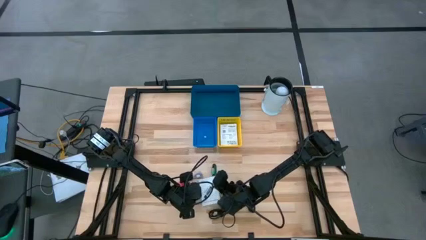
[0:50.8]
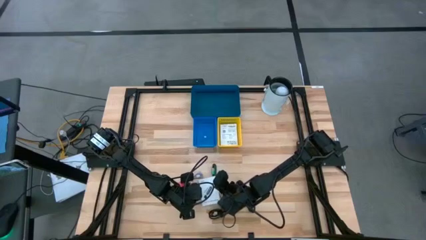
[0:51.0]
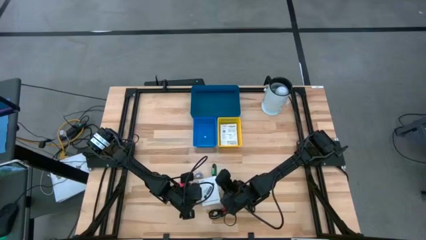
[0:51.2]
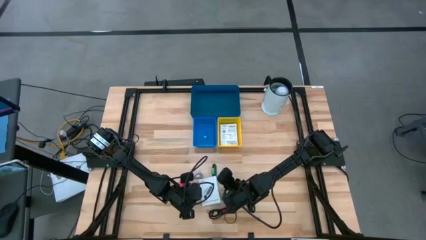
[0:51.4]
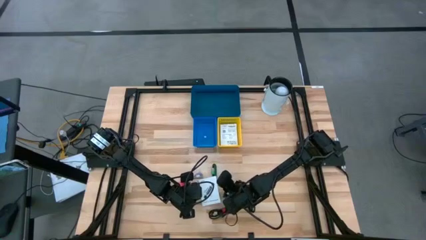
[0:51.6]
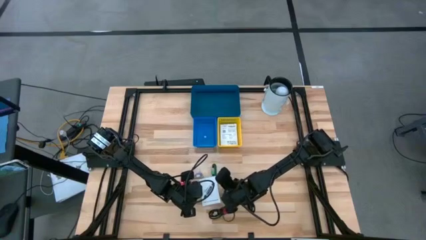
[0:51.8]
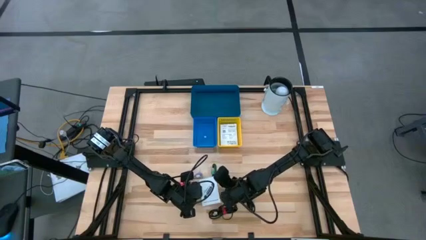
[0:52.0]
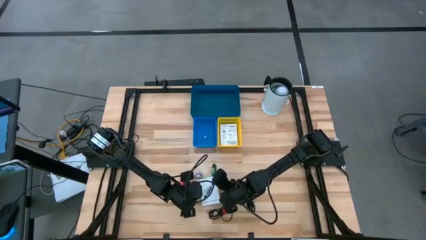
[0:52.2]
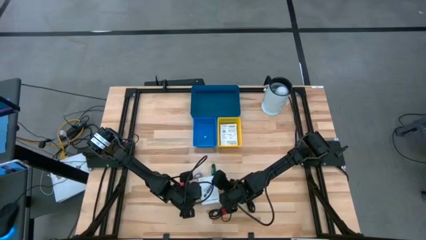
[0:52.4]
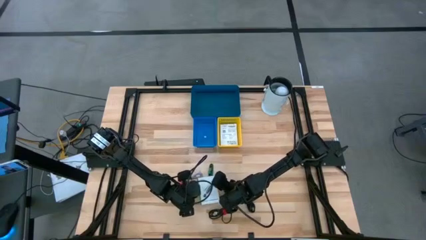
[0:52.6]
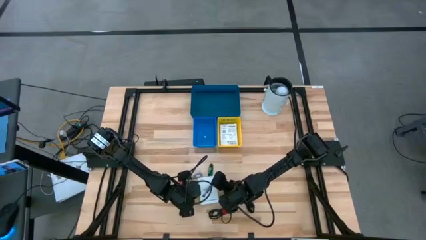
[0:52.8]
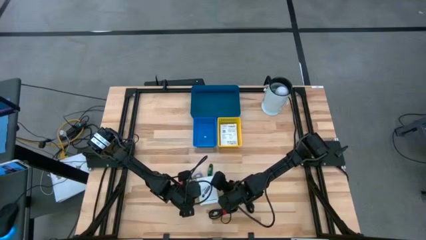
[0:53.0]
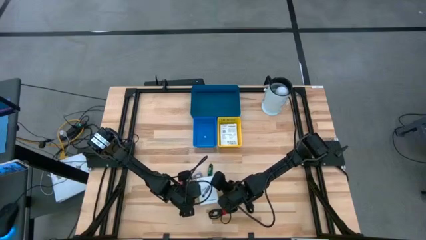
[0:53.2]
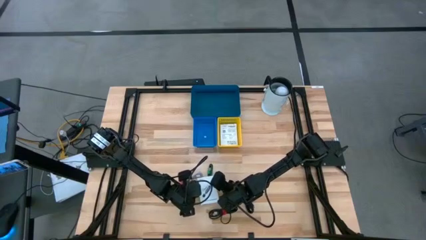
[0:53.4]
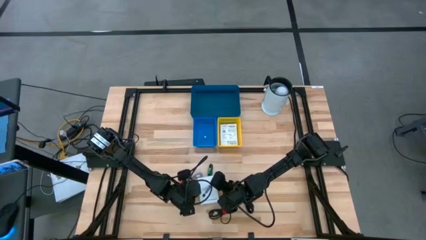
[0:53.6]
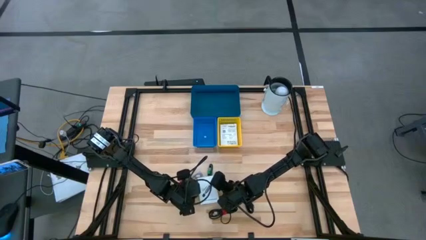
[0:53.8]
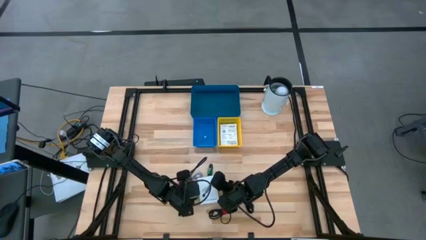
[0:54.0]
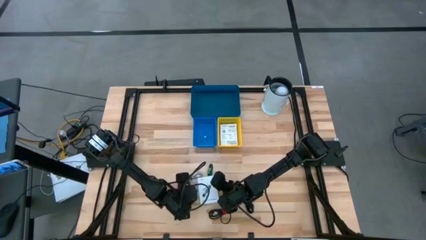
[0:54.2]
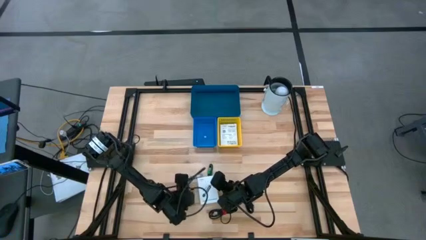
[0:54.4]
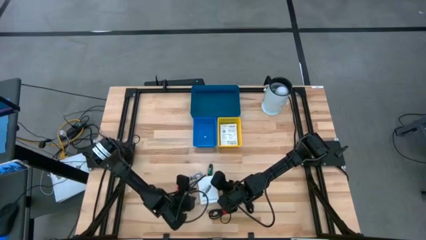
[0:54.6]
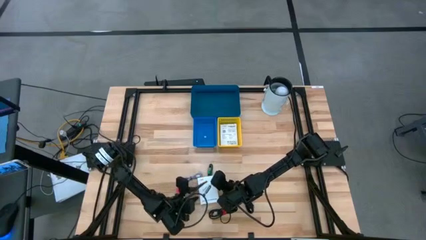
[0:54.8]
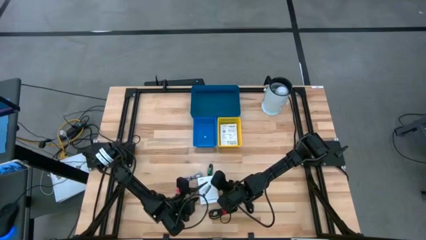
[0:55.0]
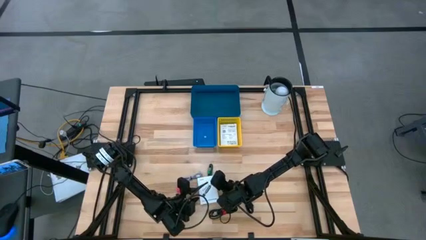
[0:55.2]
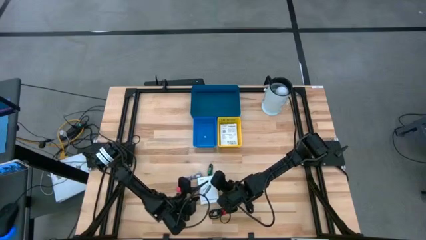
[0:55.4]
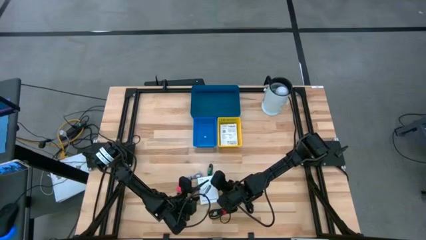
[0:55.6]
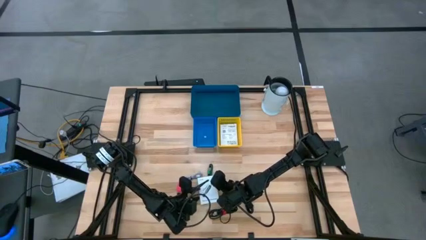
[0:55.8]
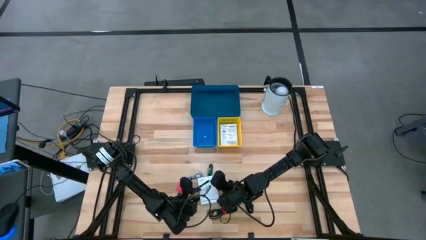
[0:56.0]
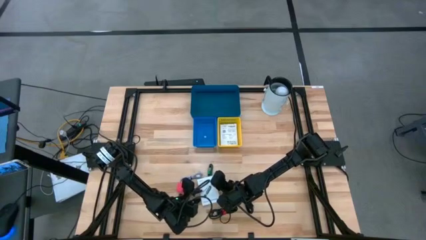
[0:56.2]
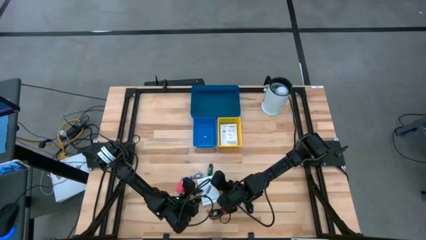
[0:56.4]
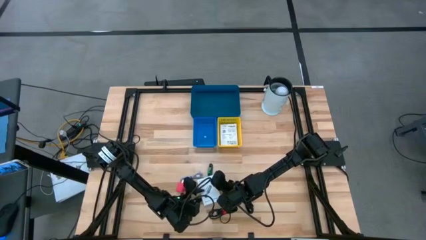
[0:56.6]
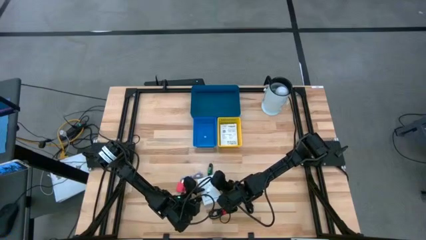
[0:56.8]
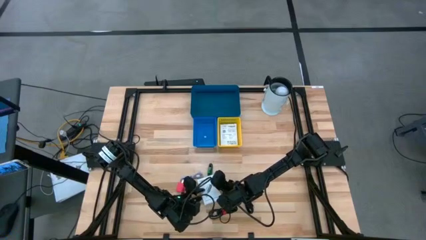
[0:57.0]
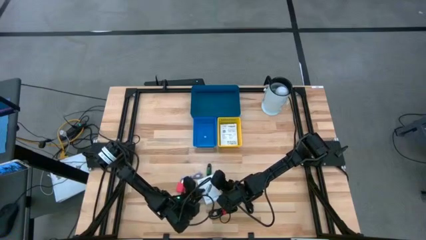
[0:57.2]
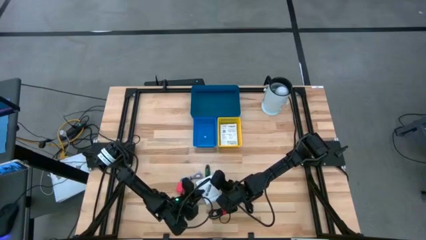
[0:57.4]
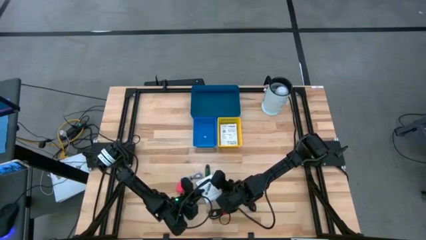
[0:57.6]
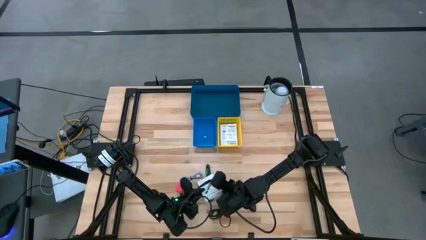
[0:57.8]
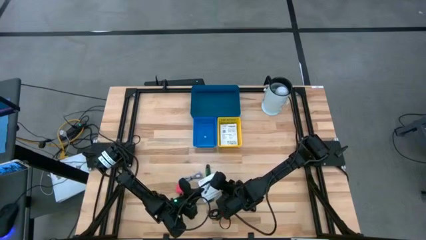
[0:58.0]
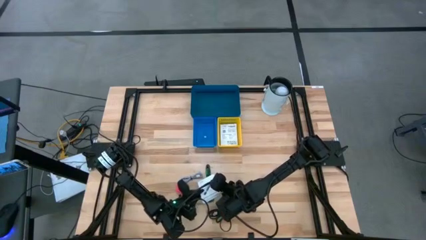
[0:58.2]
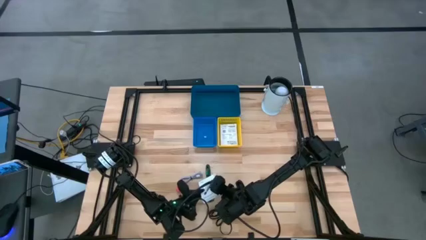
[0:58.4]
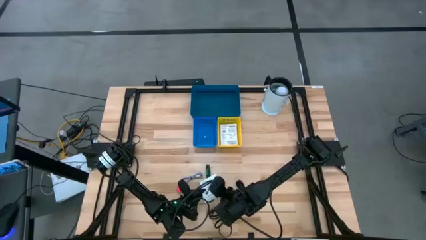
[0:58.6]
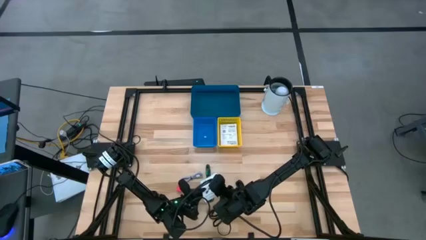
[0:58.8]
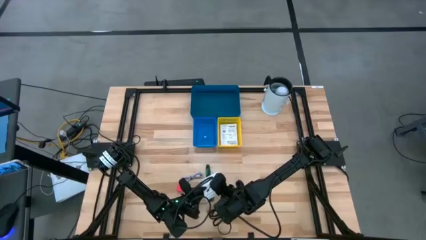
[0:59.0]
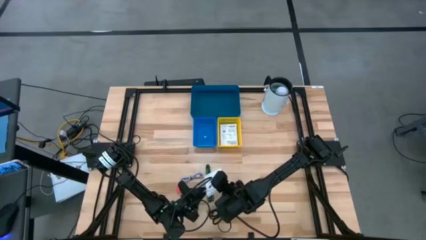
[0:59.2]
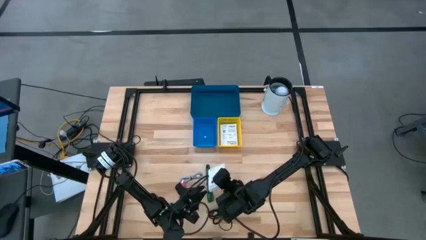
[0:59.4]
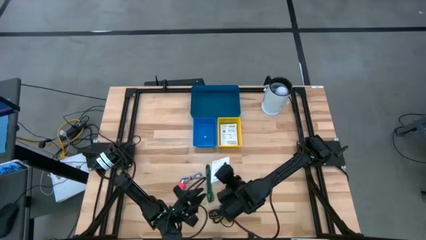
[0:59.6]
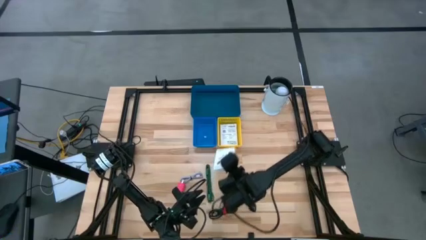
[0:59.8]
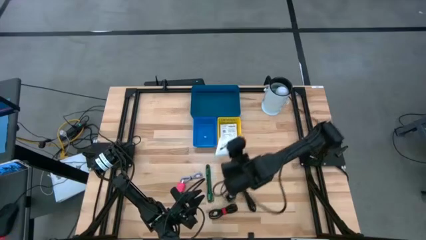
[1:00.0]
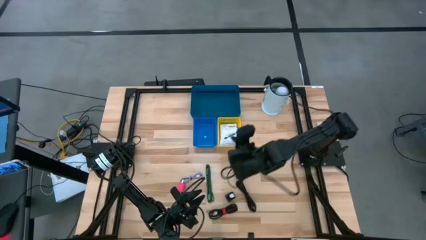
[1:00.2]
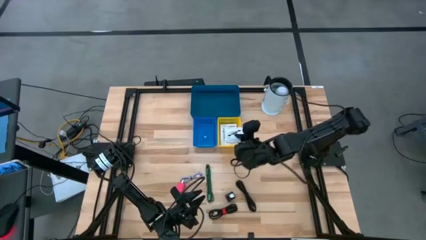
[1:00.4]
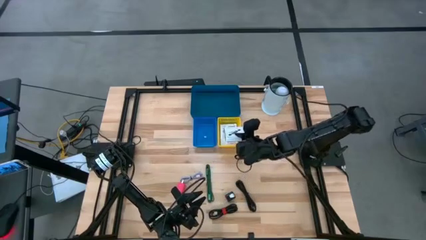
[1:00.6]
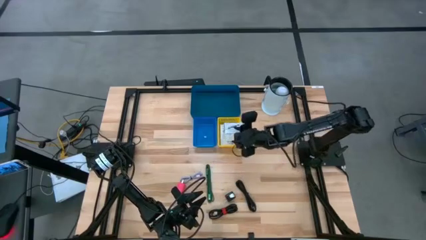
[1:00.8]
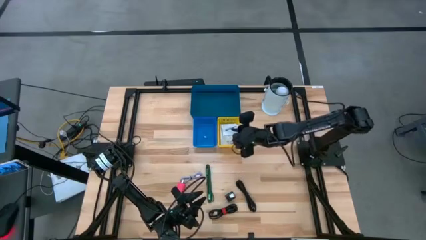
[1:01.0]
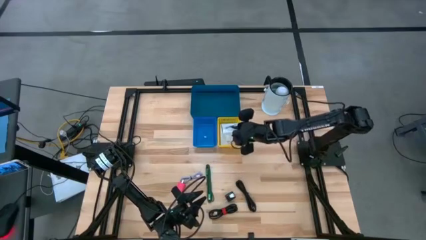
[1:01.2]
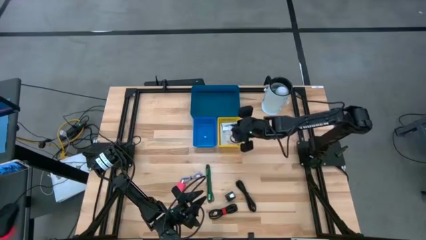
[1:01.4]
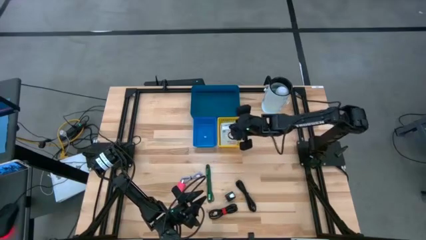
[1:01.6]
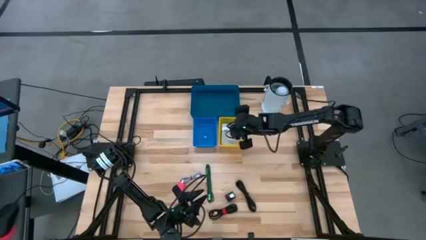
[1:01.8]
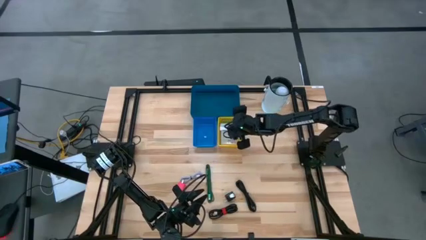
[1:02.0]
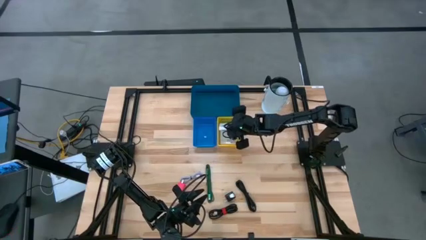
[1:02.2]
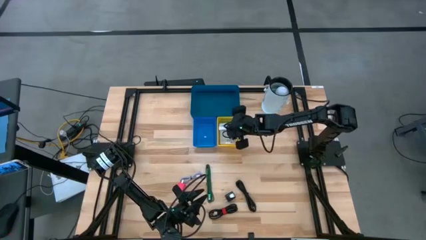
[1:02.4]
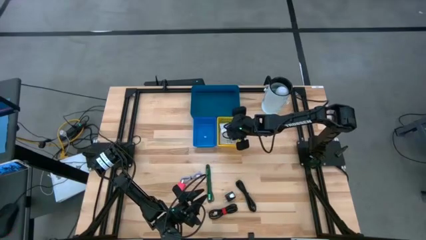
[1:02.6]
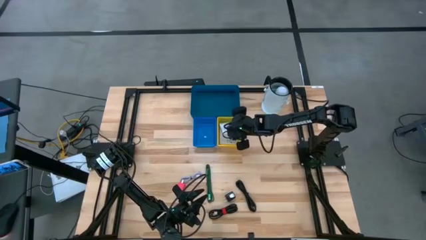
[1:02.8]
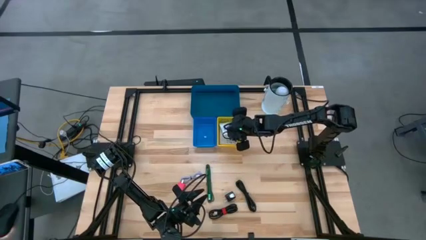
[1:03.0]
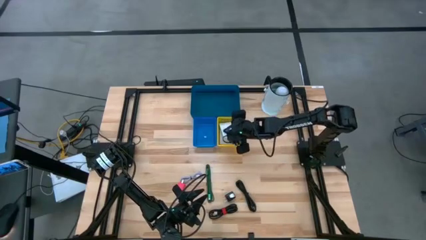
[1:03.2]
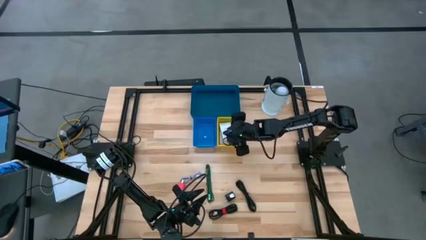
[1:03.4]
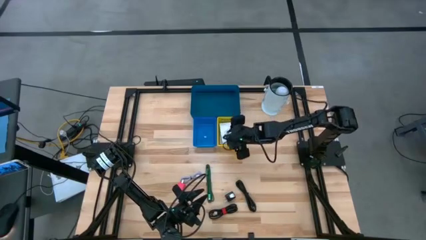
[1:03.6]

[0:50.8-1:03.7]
Task: Pick and place items into bin
Put the white card reader box into the yellow bin

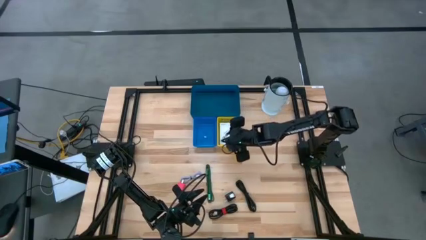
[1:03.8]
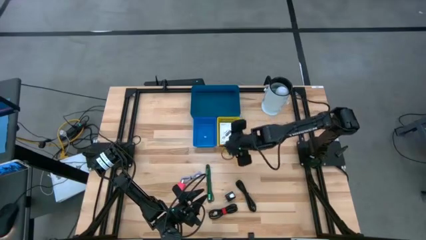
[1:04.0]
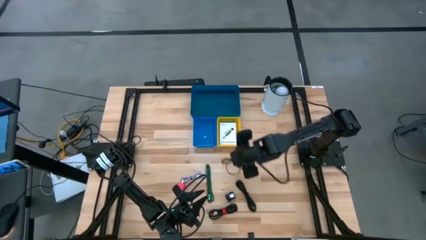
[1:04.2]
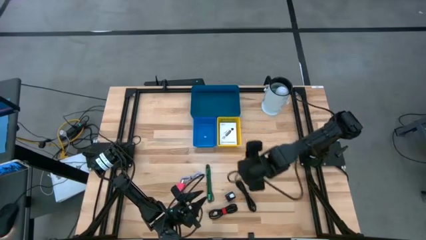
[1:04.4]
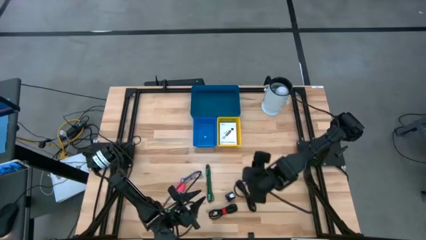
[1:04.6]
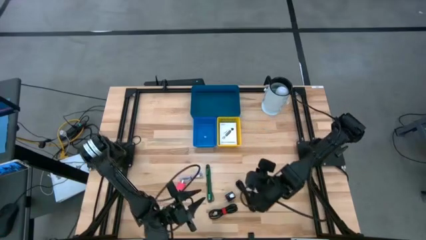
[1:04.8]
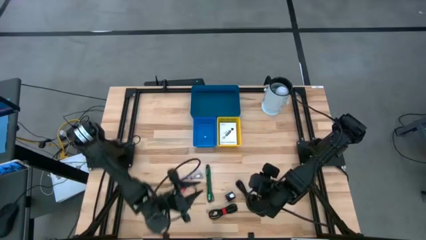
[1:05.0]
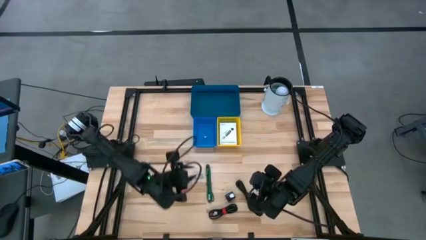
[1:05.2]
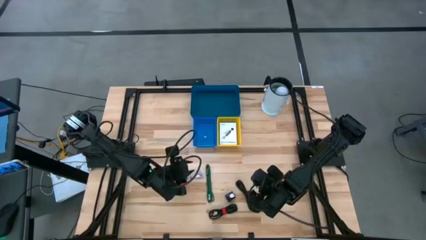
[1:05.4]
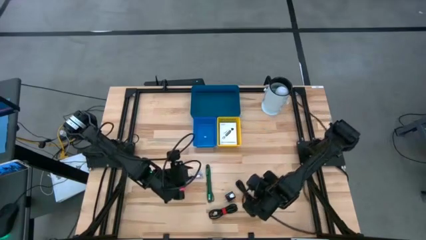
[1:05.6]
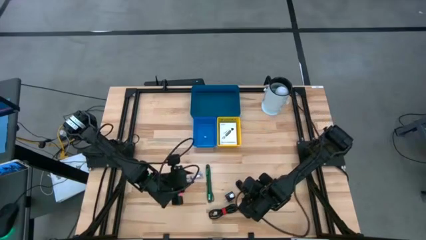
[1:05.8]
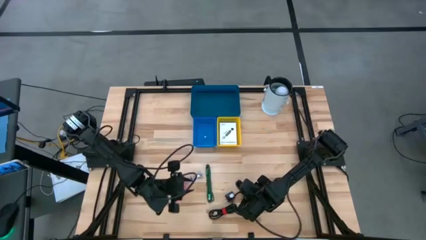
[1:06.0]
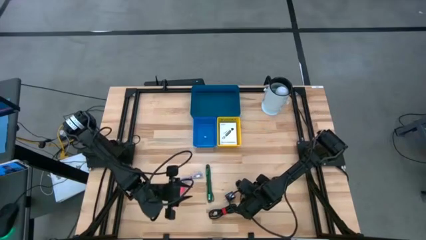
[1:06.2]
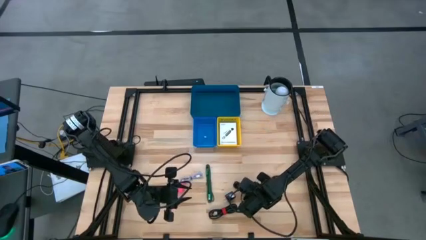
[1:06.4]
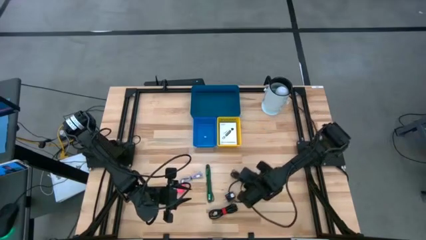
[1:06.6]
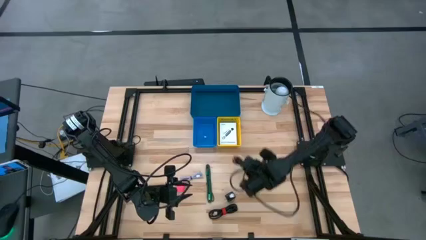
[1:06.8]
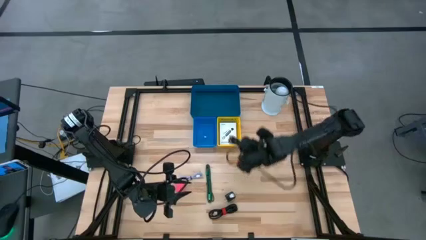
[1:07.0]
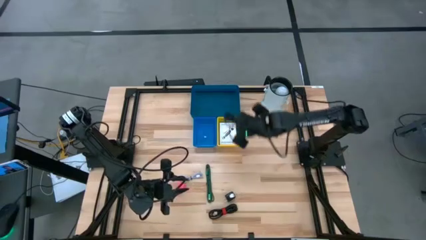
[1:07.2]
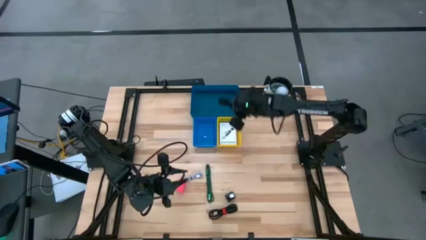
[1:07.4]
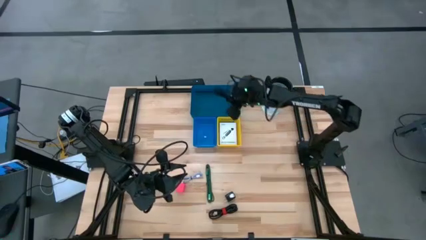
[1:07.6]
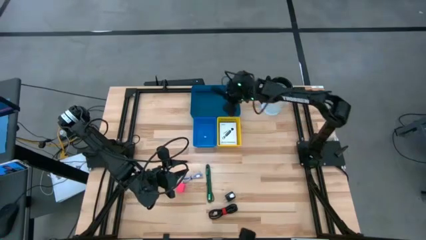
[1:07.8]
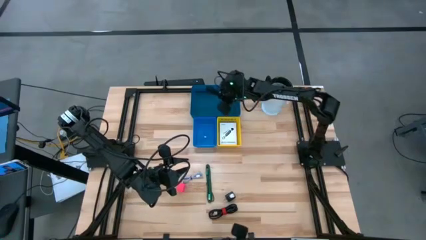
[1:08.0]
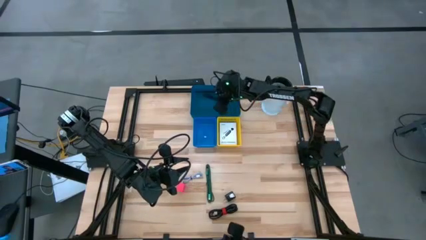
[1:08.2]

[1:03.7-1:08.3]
Put the right black charger cable into the dark blue bin
